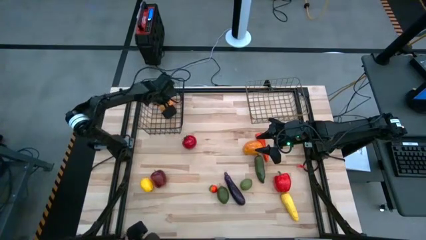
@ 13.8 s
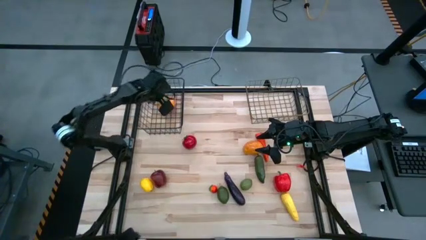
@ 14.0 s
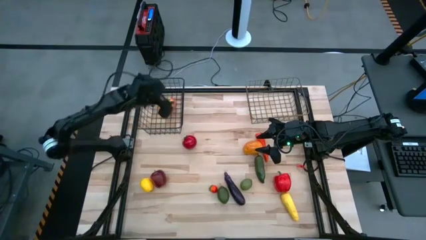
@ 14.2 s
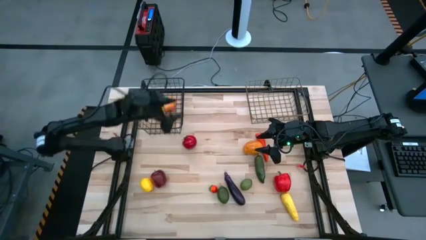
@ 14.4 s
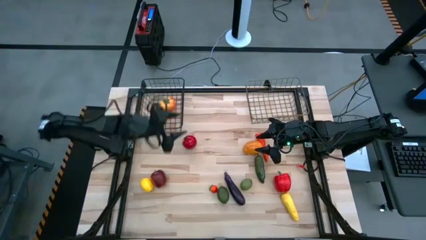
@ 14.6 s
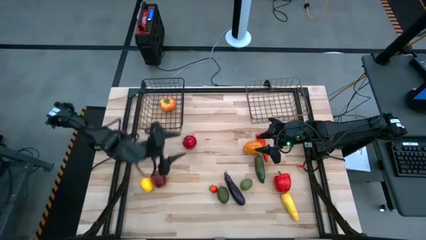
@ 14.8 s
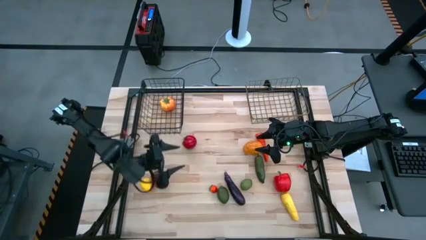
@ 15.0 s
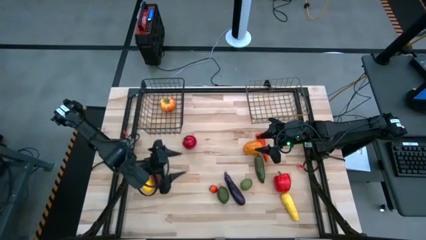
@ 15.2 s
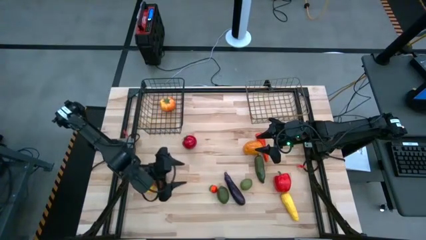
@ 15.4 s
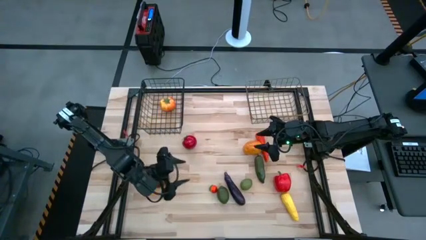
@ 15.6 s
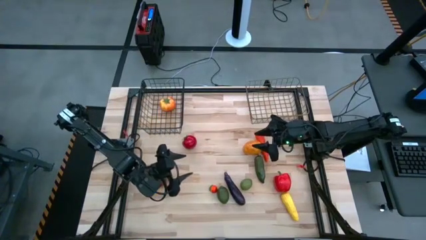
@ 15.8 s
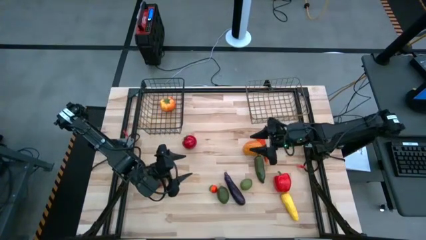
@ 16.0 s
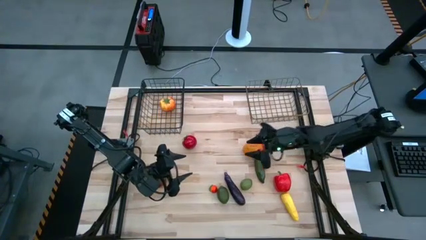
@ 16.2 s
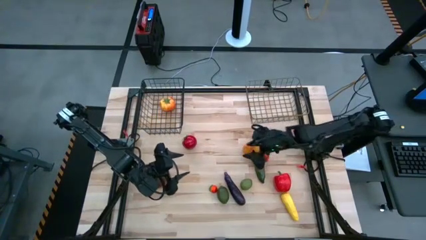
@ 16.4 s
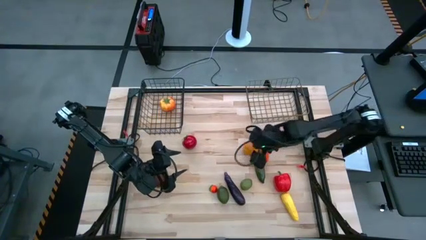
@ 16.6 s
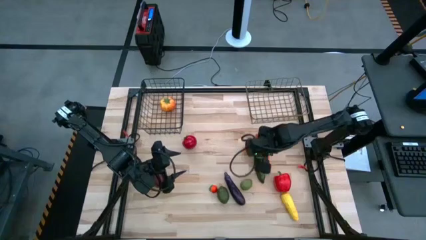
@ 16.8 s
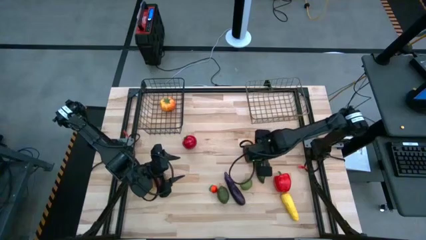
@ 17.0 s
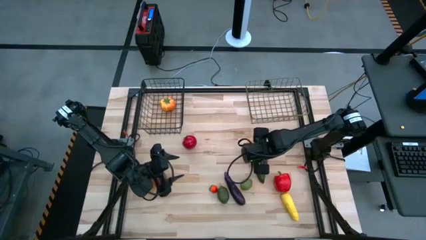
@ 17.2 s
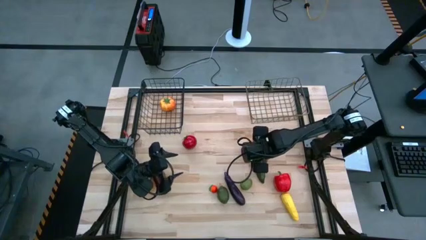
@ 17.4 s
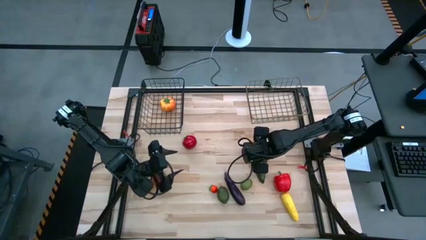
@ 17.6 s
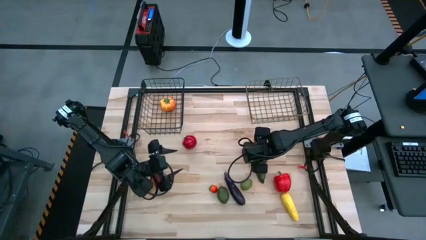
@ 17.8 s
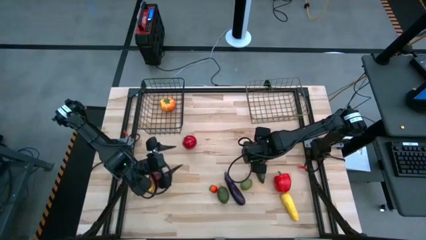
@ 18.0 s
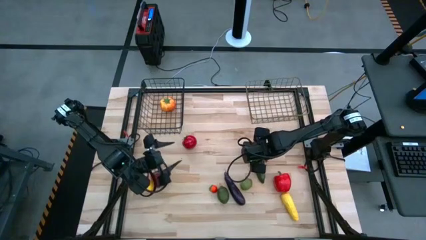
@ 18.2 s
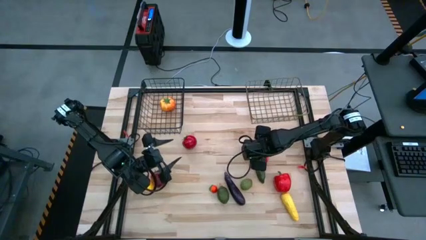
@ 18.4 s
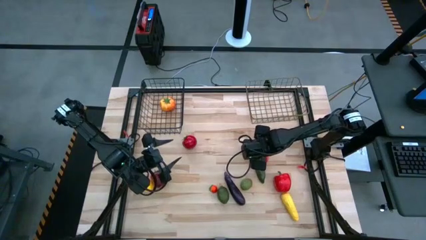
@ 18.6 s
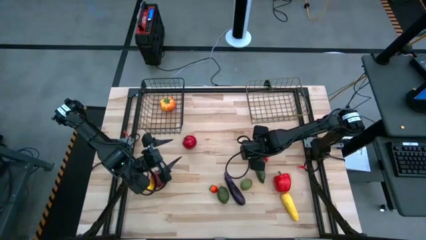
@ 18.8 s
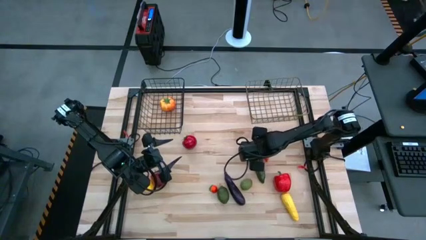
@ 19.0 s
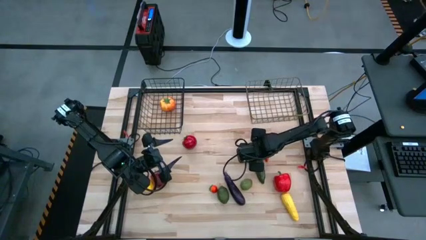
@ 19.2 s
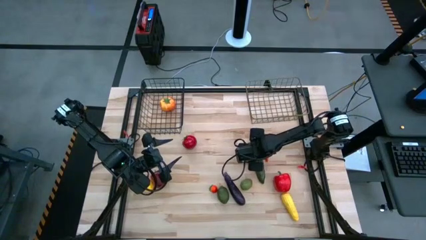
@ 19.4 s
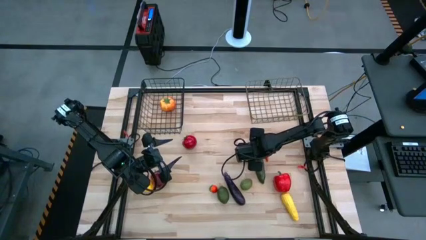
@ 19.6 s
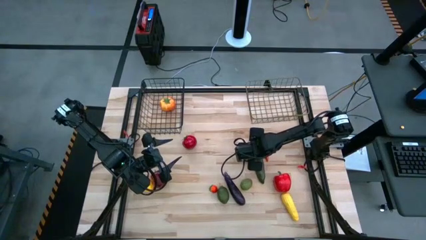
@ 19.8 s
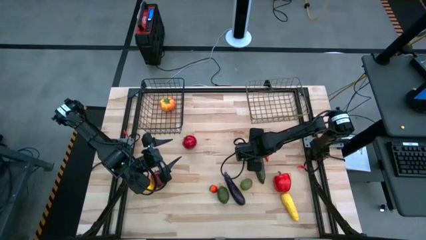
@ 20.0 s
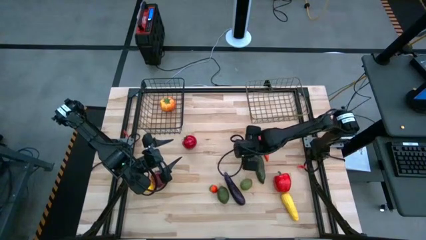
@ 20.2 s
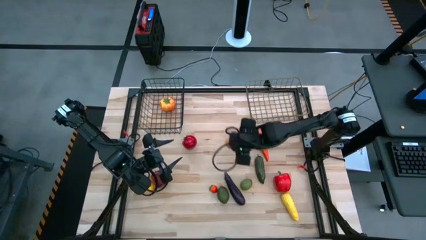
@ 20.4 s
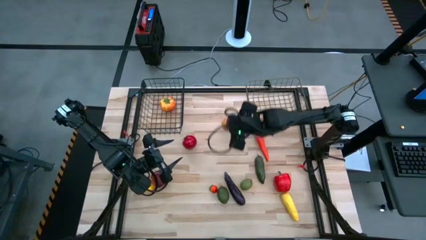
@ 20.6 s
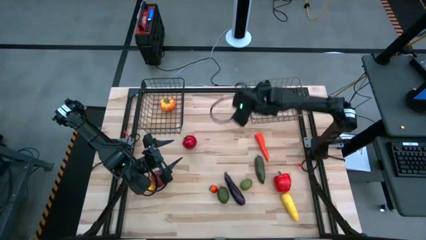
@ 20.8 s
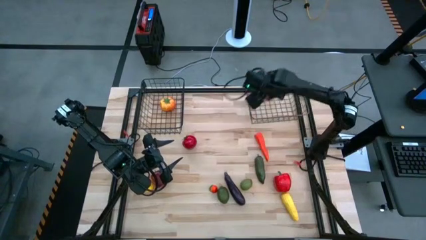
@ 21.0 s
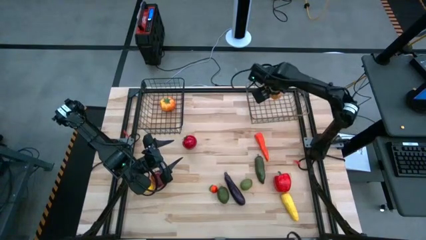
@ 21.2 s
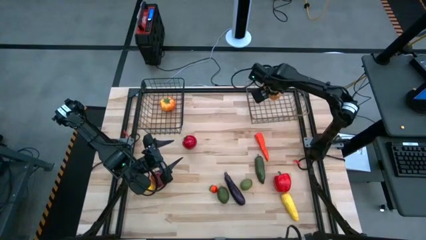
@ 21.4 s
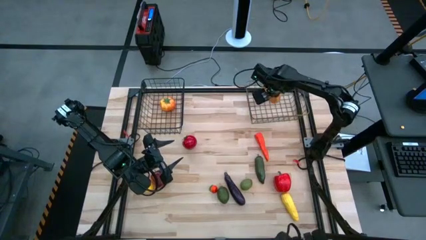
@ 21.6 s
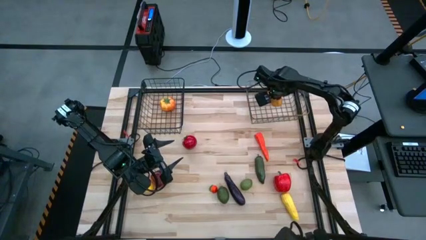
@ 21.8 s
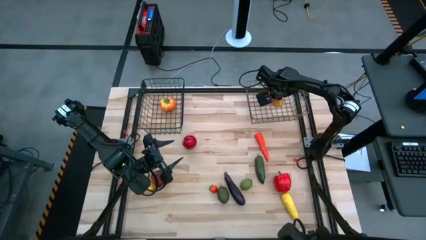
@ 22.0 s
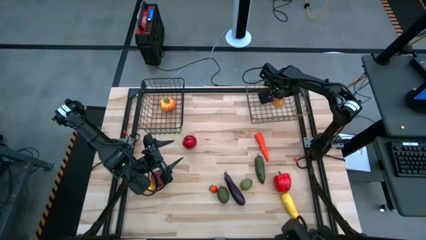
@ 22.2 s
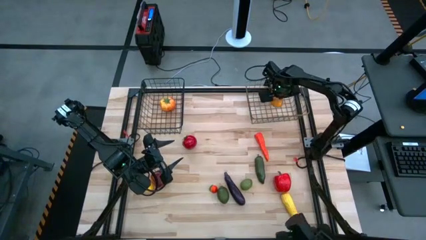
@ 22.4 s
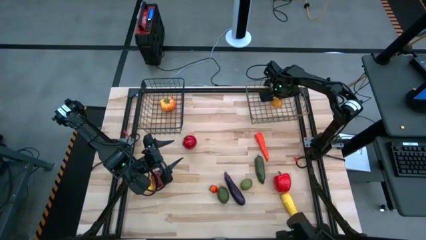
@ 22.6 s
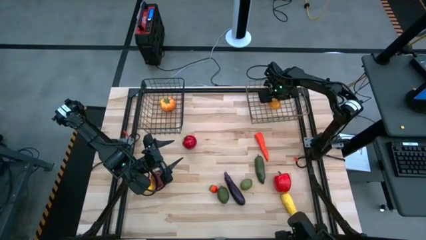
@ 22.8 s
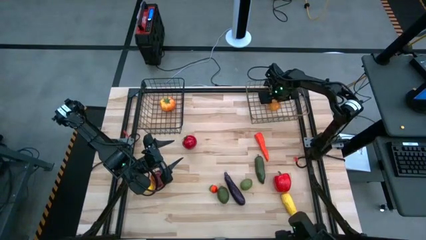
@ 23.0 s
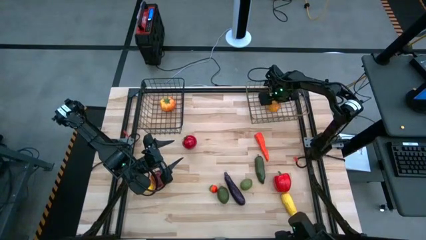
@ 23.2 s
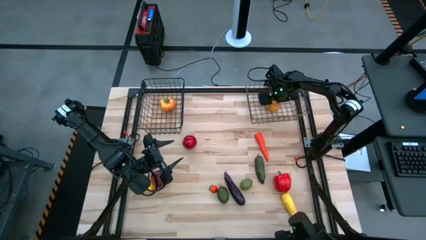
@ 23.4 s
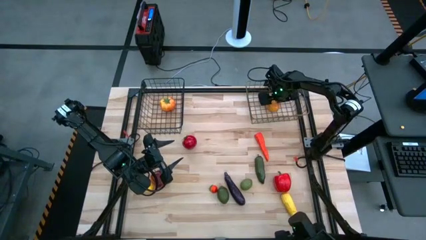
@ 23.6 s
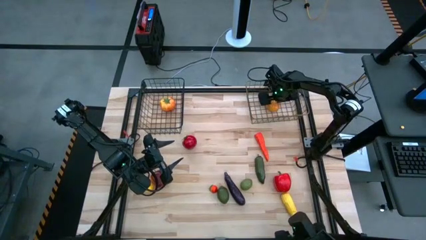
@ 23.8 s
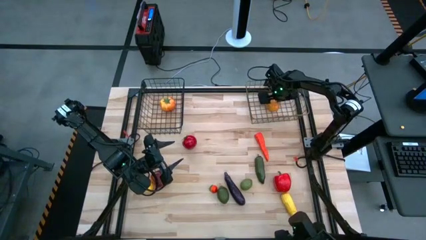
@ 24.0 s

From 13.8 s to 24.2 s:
Task: Sort produce into baskets
Put the potato into the right wire basket
